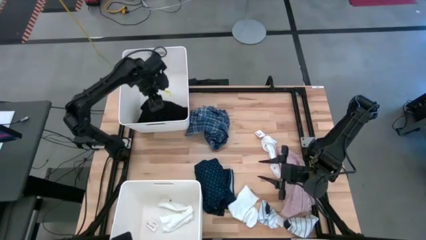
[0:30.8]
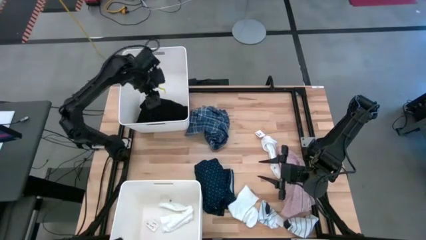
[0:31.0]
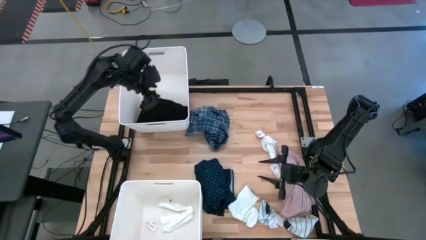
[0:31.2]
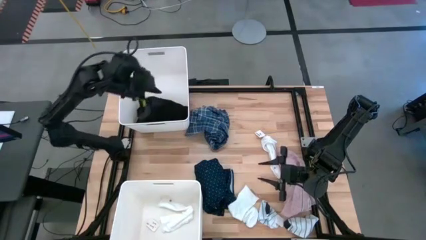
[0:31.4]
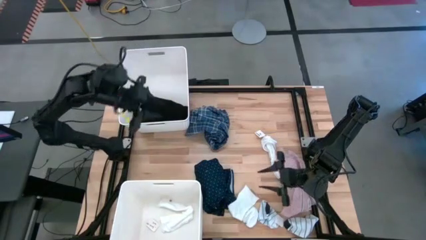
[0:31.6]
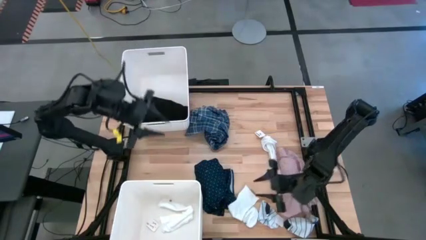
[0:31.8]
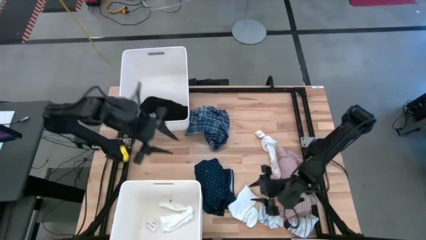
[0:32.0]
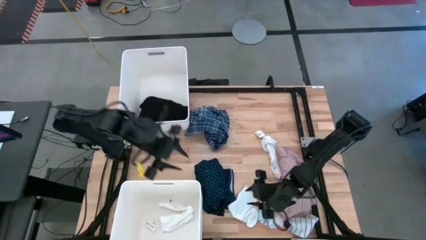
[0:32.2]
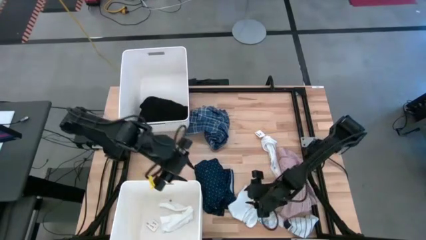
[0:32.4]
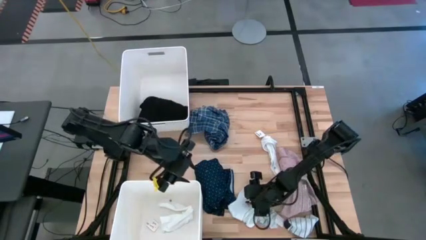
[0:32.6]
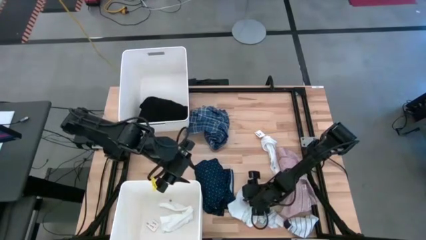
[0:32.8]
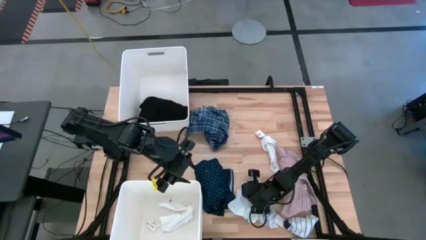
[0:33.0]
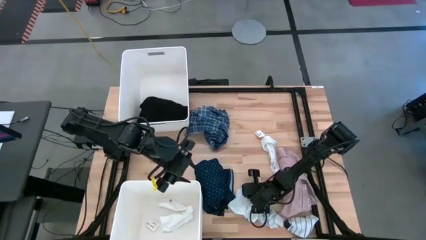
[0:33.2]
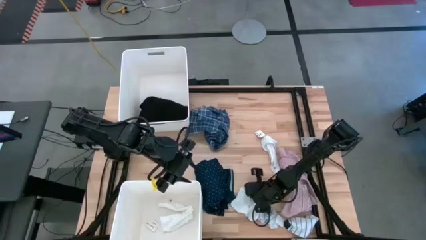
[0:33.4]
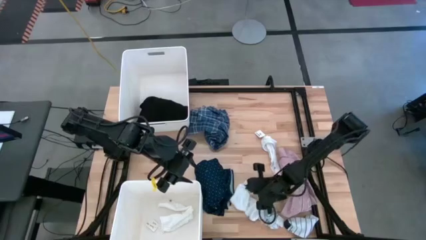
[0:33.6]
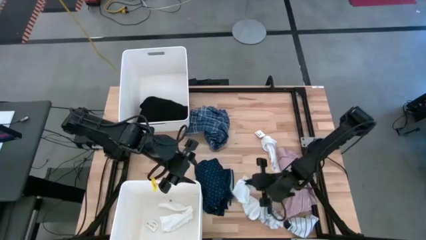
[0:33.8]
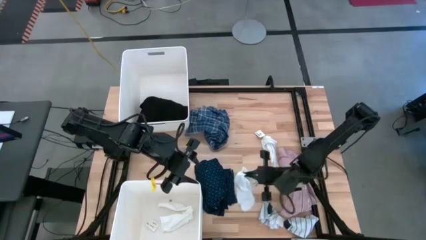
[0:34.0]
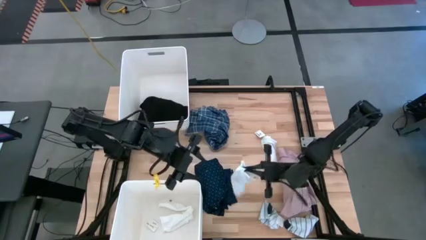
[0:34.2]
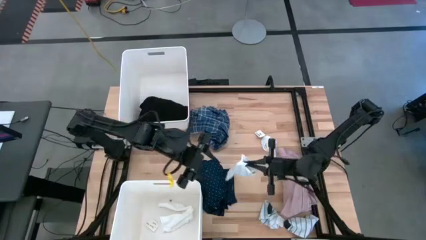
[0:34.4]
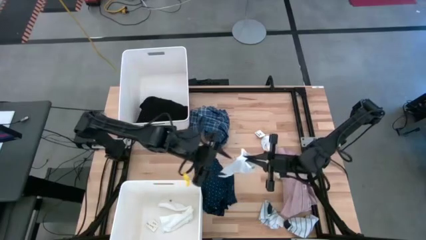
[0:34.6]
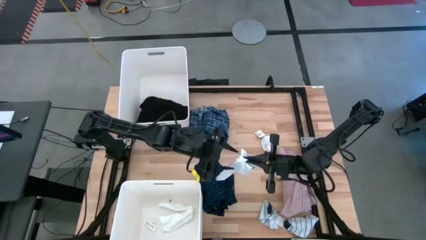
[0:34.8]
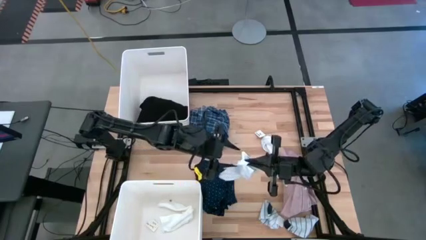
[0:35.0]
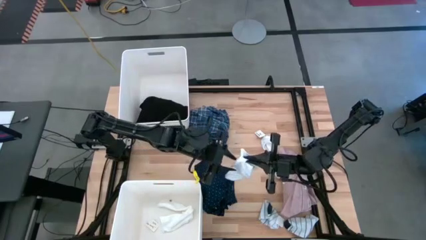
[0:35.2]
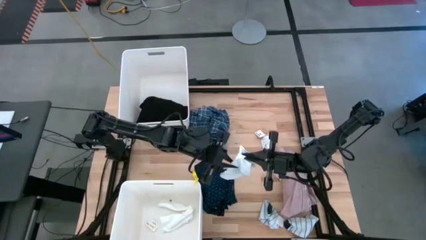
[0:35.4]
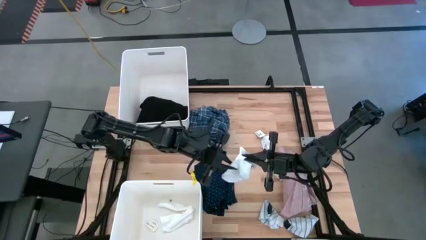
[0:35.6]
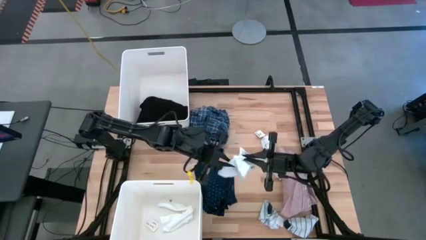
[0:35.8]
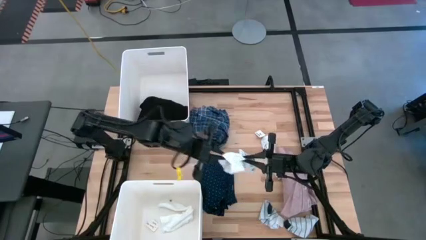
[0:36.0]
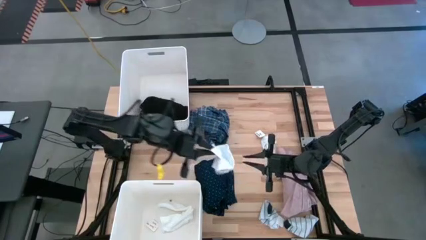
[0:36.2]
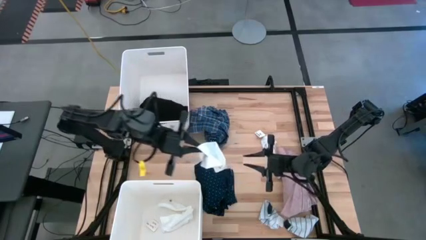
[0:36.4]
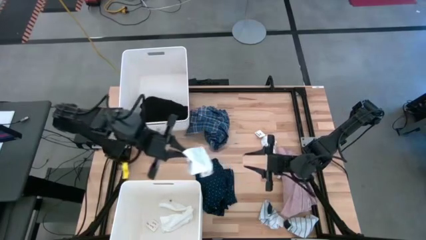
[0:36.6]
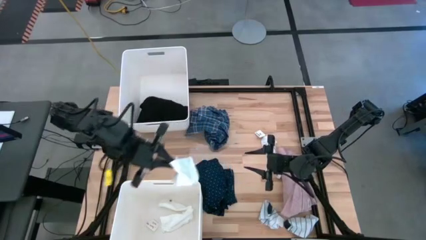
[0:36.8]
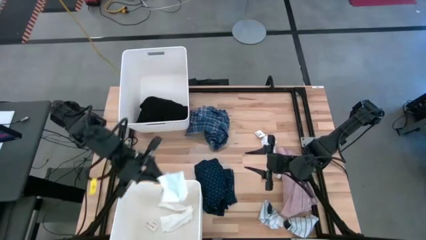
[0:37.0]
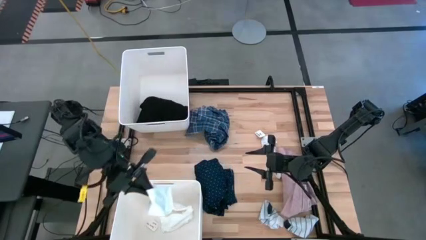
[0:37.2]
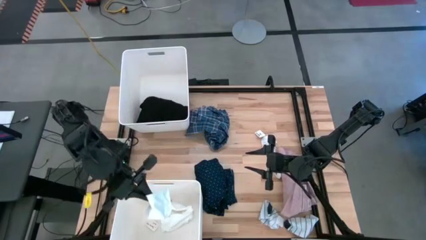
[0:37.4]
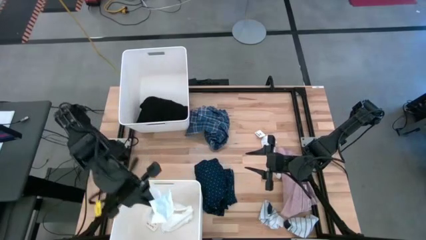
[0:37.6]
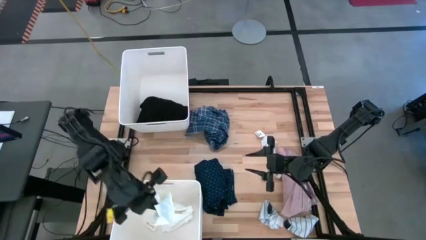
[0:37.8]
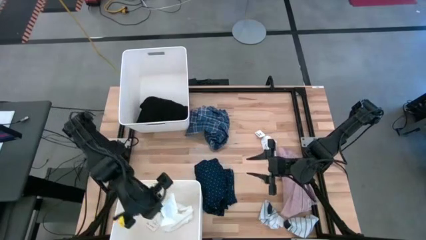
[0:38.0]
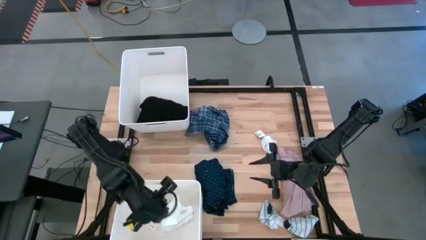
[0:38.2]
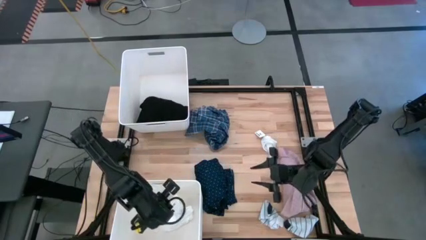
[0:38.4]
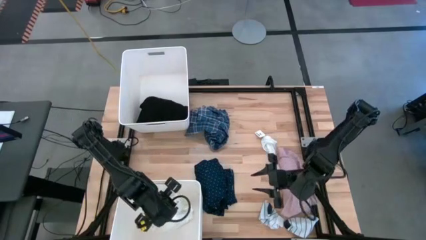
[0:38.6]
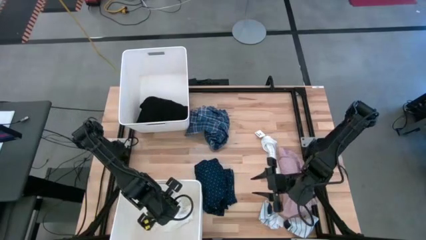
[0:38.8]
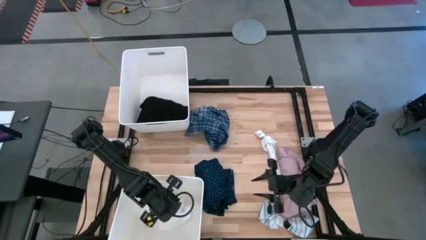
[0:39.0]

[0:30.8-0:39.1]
Task: Sort clothes
Put the bottom white sock into the bottom white bin

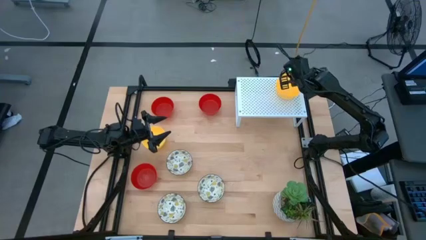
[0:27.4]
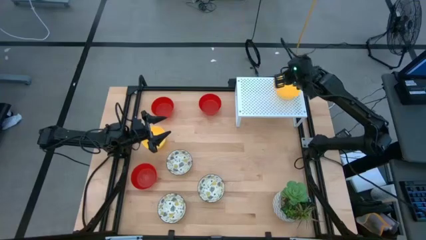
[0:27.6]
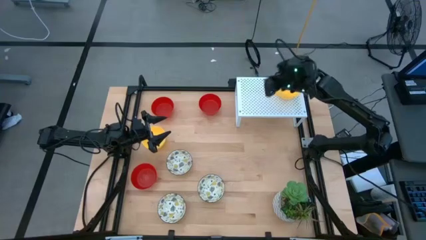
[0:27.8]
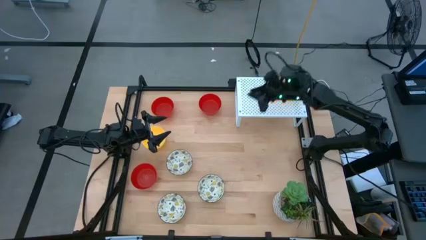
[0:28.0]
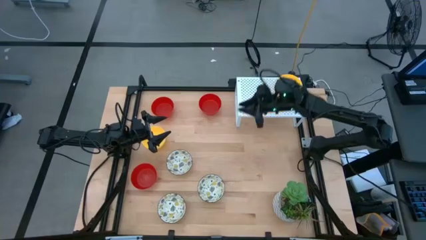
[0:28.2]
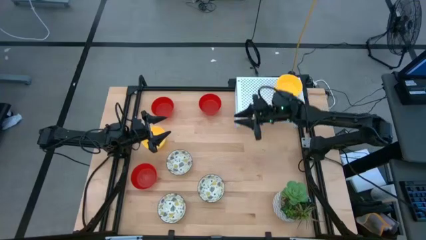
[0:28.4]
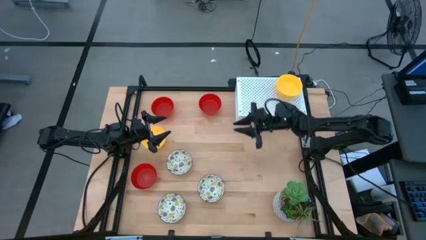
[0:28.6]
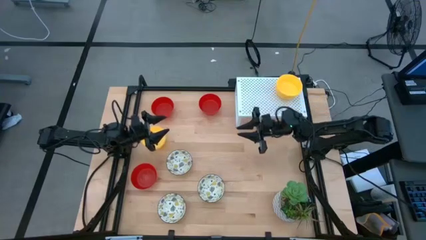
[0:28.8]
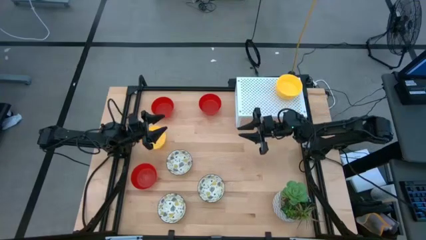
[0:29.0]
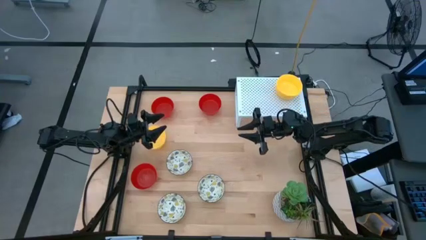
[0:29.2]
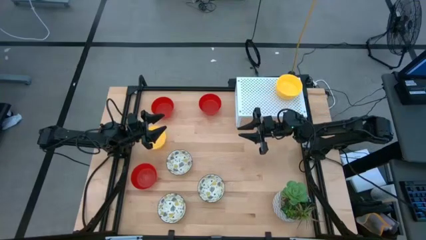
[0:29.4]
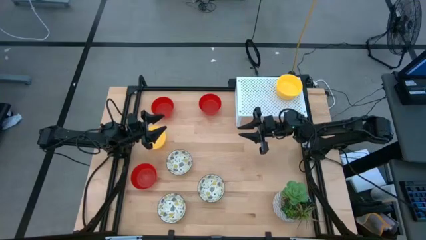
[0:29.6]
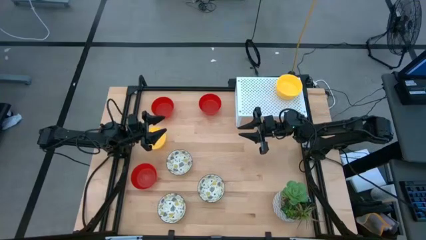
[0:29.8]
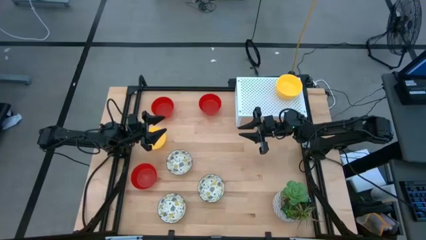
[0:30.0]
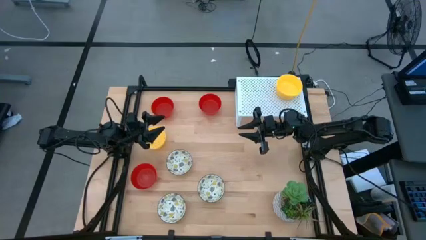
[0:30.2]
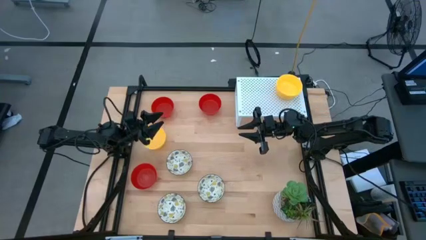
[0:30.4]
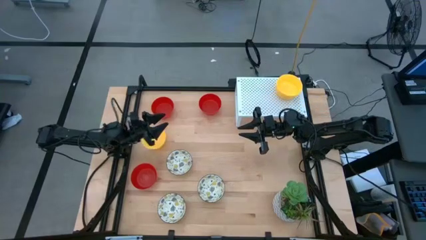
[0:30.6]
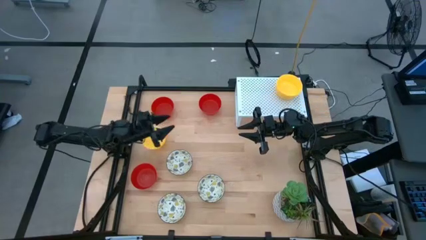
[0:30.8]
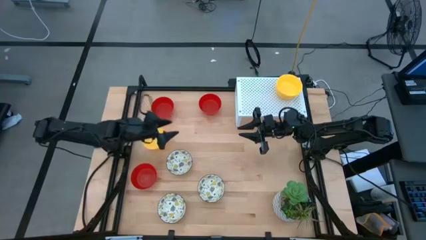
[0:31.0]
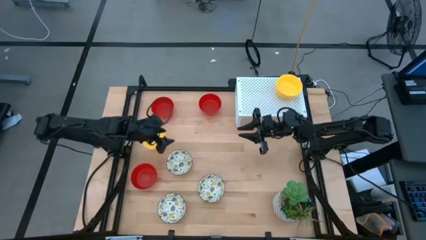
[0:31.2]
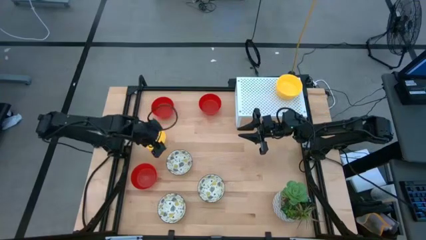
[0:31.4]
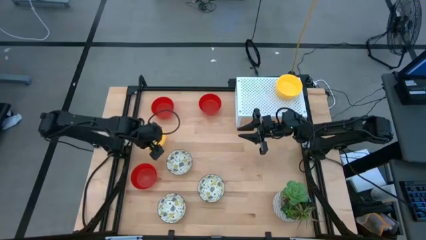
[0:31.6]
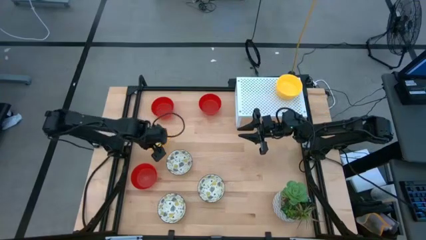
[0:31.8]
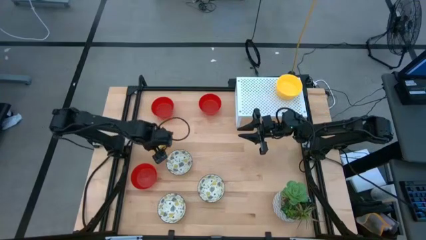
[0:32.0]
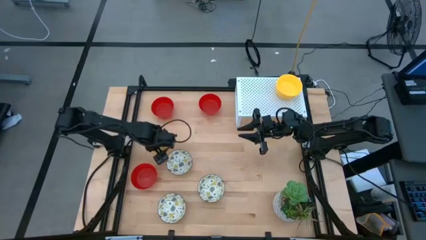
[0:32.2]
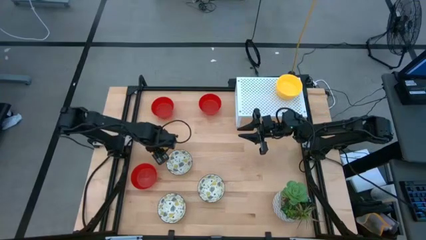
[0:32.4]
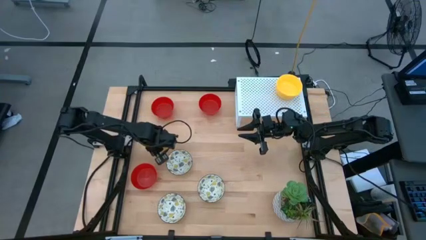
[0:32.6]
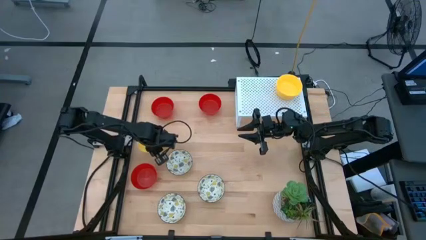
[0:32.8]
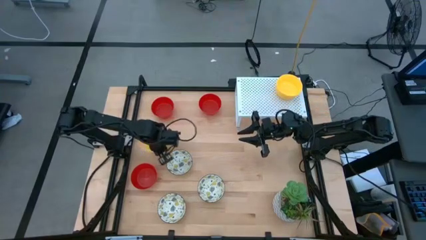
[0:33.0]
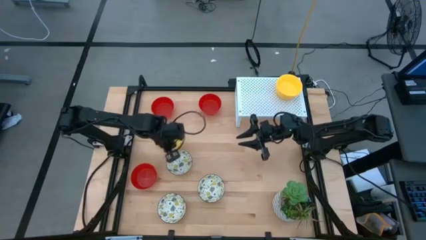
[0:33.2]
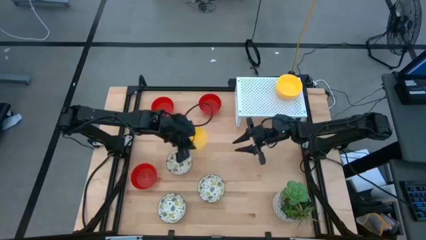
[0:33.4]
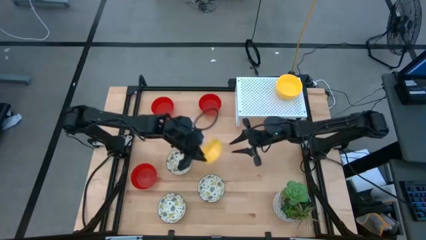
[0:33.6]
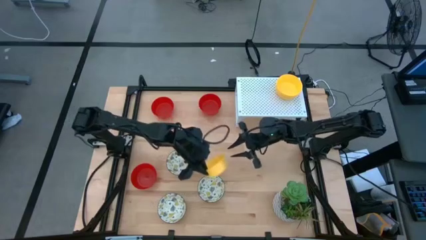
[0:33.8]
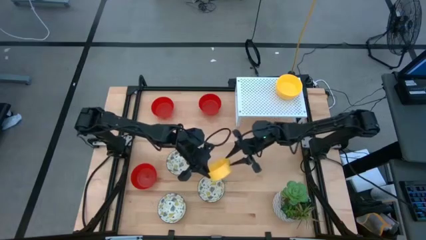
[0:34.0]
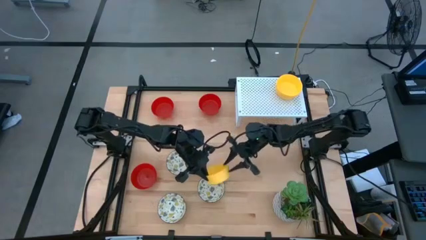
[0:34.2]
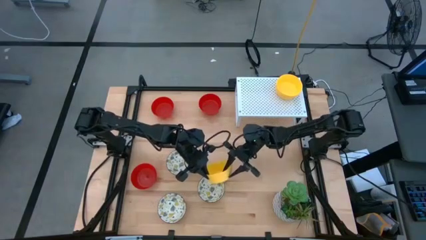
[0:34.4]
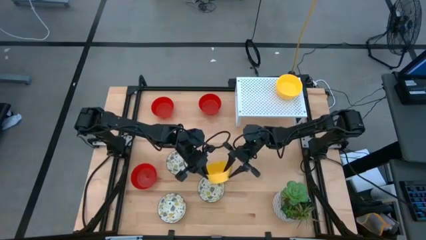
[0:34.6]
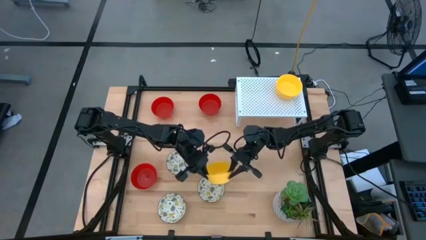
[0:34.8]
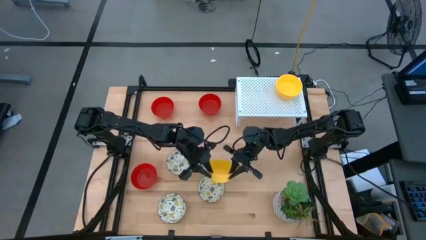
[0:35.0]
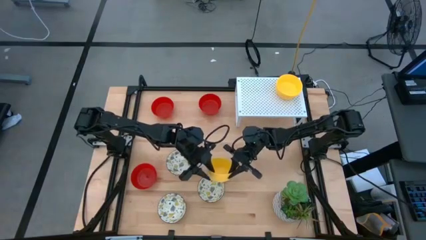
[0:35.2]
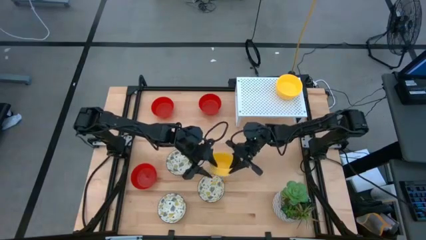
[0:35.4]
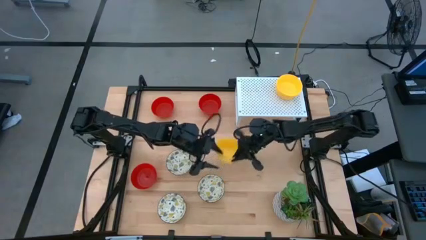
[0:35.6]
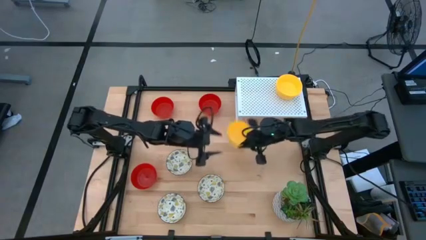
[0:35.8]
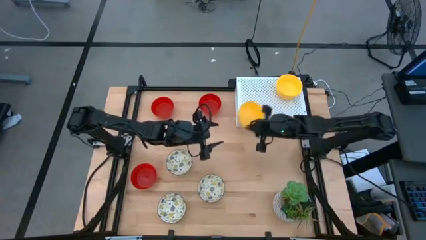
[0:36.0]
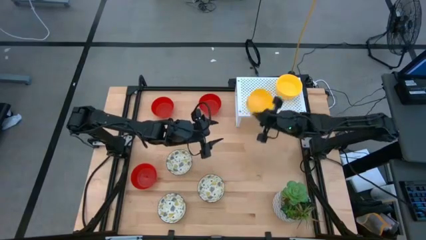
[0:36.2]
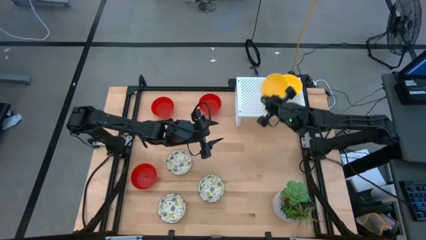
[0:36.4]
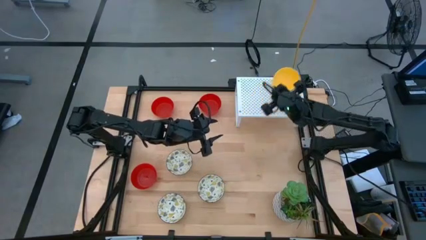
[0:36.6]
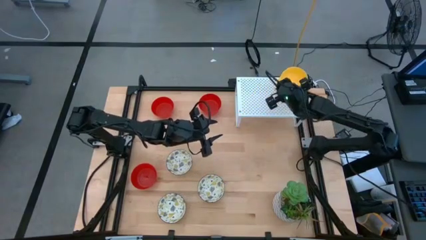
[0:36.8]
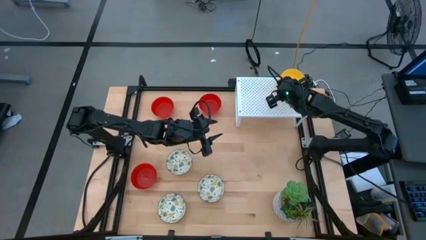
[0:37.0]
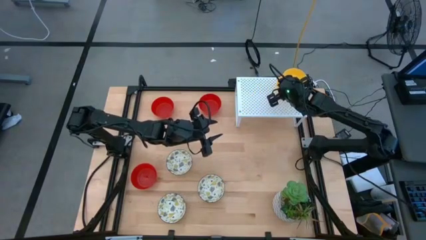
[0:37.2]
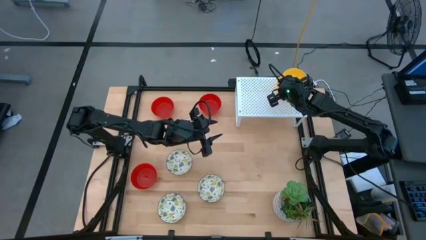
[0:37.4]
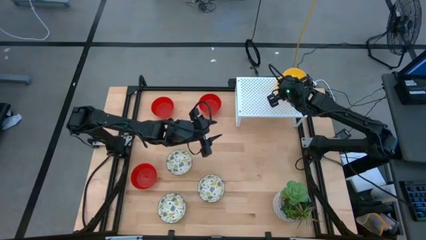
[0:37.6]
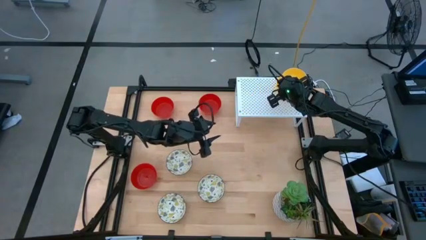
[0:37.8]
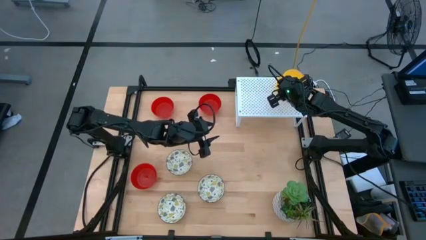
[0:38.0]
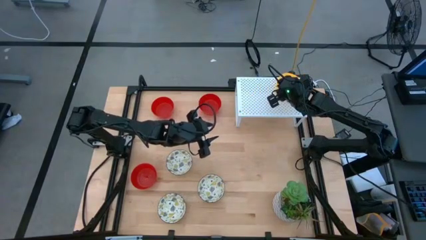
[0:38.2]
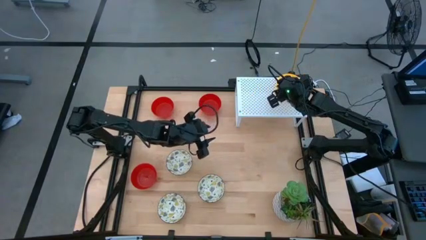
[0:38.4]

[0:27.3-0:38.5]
Task: Pick & Place Mini bowls
Stack the yellow bowl on top of the yellow bowl on the shelf
